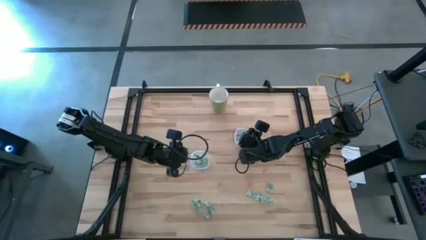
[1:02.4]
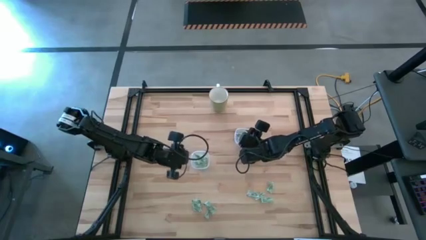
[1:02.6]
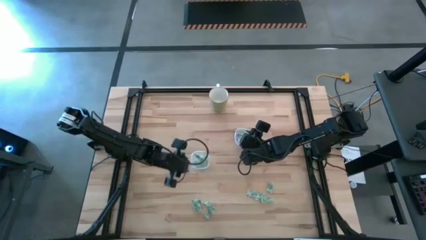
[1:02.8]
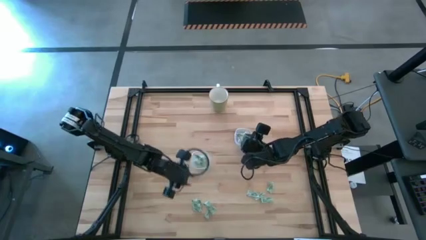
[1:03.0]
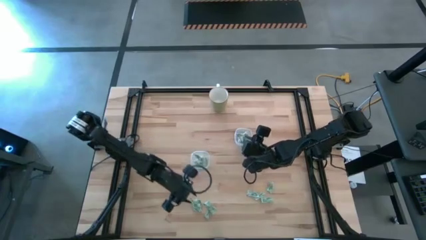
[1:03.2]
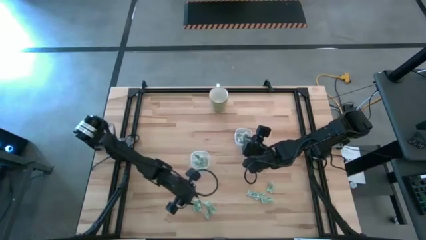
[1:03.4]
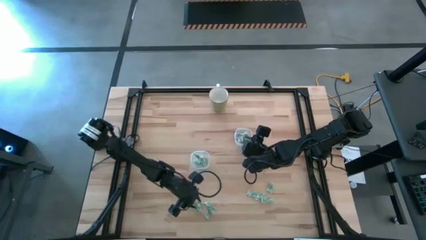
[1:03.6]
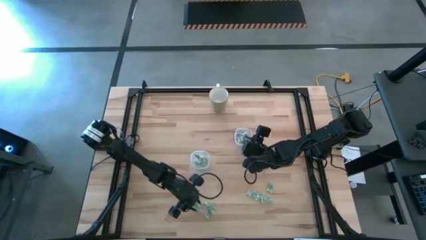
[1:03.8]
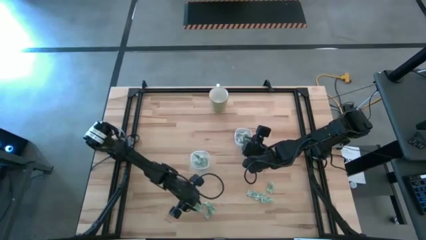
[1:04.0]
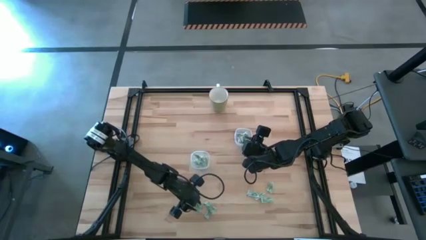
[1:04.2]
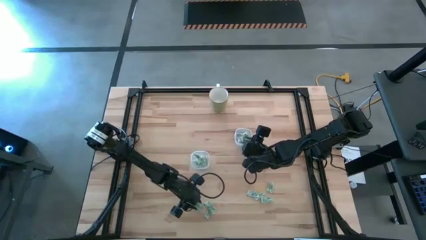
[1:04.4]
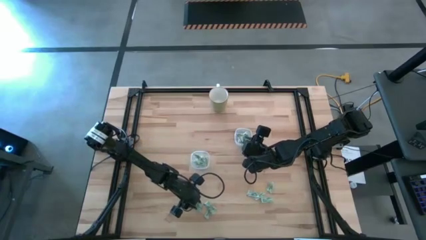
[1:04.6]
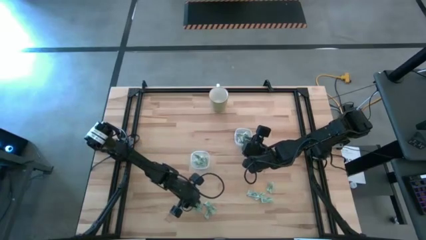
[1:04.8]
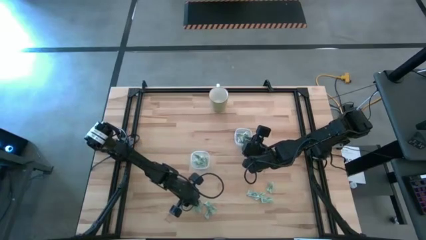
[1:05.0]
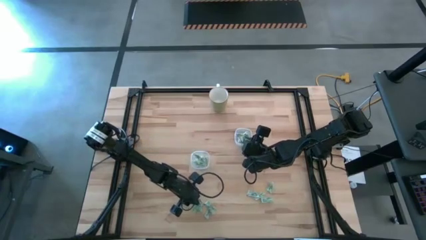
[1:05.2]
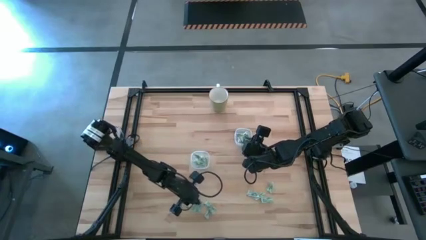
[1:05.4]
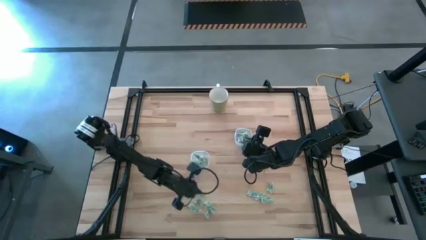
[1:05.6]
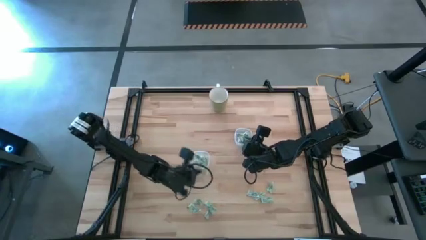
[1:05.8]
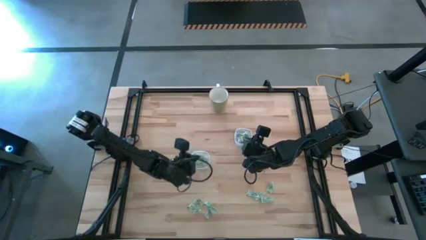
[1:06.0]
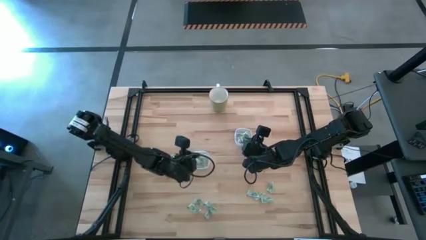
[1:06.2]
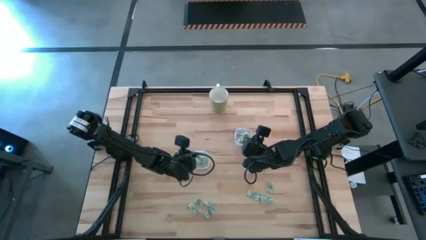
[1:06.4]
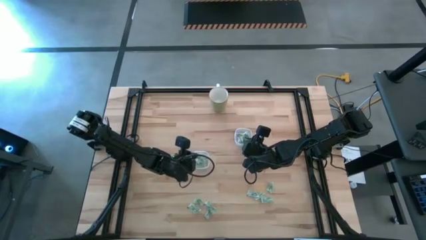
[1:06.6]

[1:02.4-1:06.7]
Task: Pick and place Stevia / Truvia into bins
Put the green stevia packet into the left transparent container

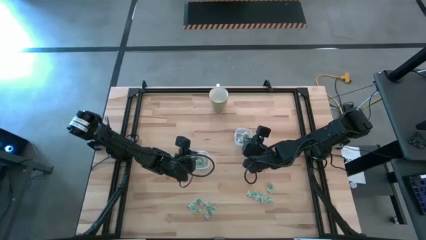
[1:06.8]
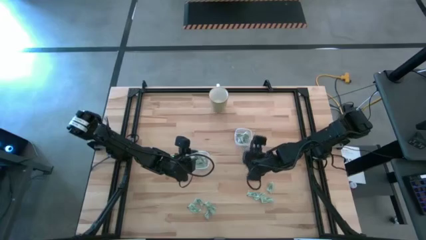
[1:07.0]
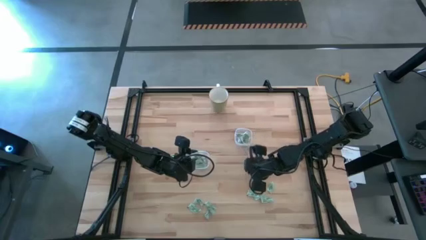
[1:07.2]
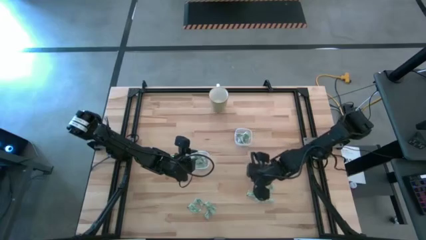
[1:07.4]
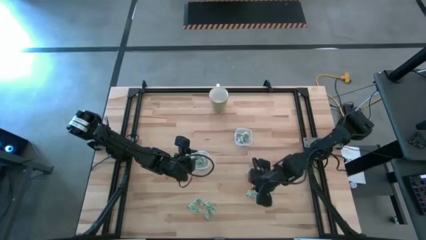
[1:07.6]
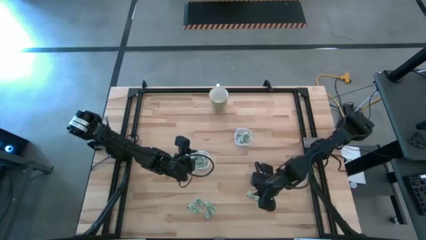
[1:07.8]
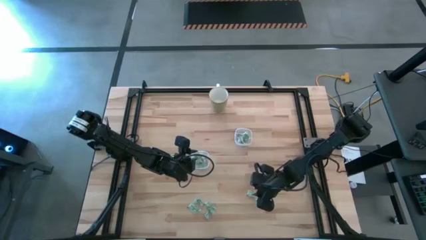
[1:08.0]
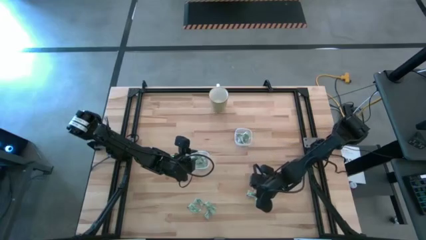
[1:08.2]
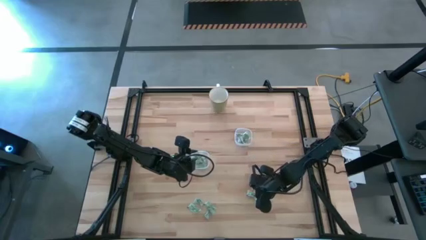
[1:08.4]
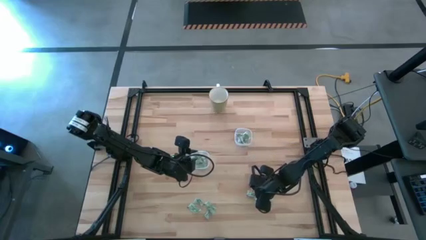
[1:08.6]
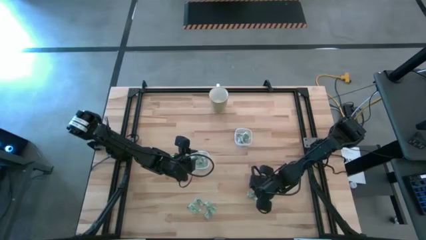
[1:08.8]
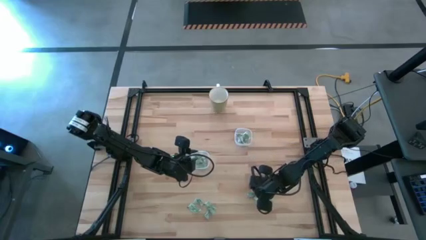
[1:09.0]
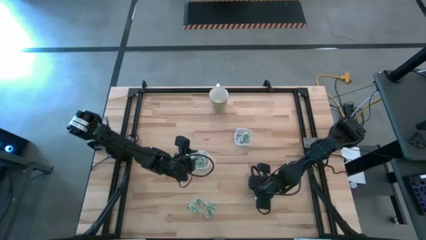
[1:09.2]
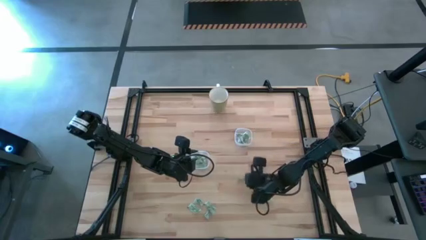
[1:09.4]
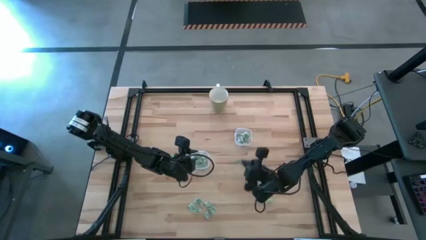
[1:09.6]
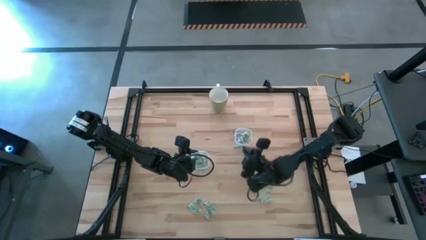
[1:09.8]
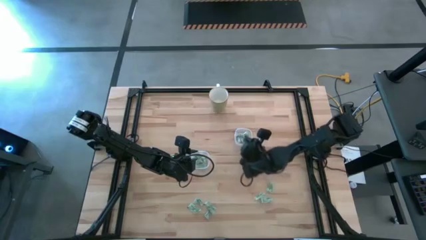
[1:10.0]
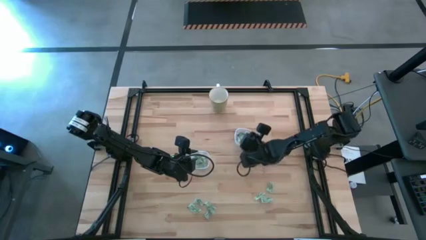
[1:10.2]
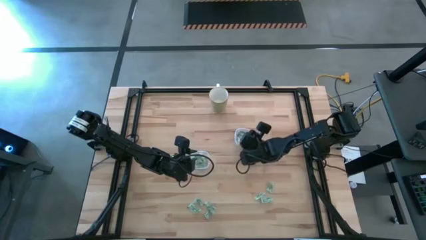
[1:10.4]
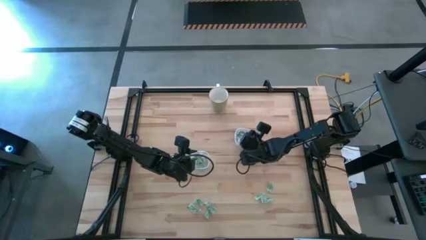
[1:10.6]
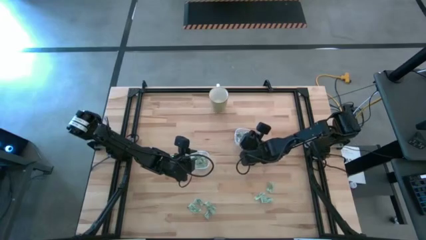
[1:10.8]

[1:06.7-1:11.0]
Put the green stevia packet into the right transparent container

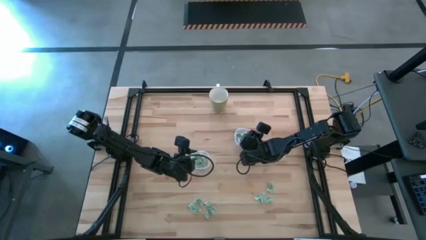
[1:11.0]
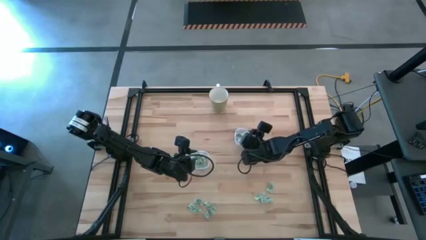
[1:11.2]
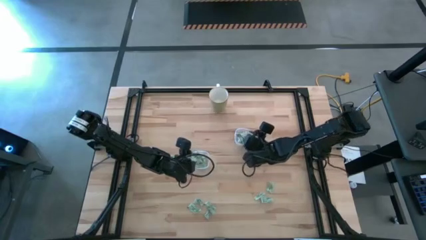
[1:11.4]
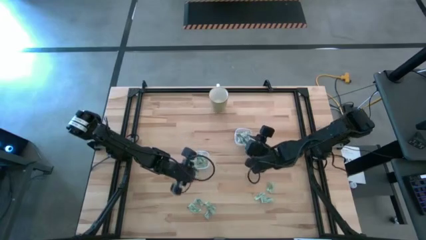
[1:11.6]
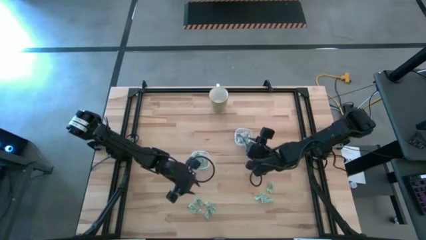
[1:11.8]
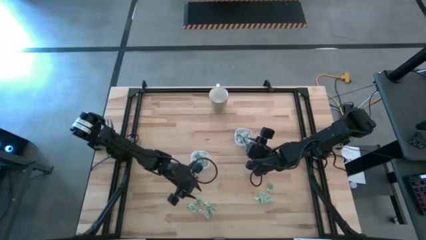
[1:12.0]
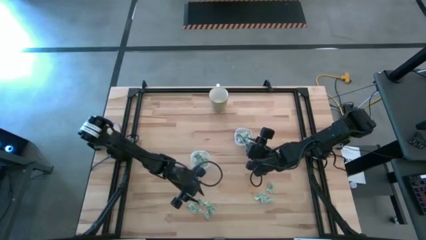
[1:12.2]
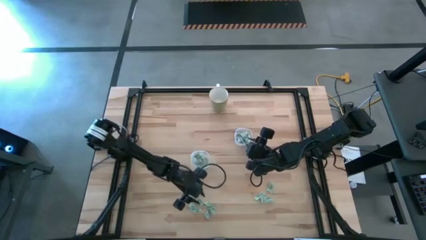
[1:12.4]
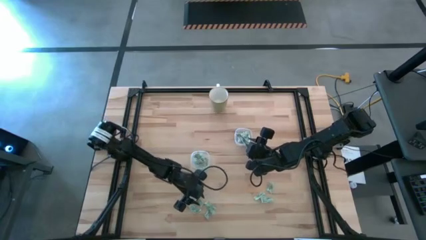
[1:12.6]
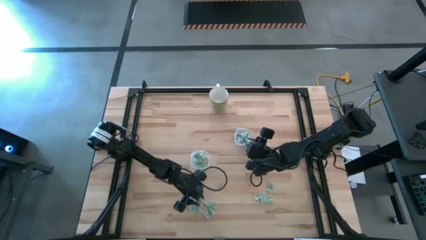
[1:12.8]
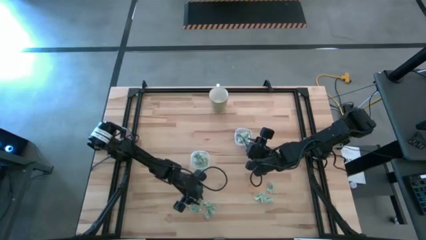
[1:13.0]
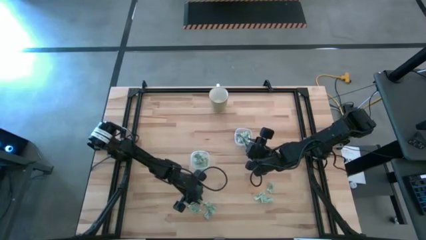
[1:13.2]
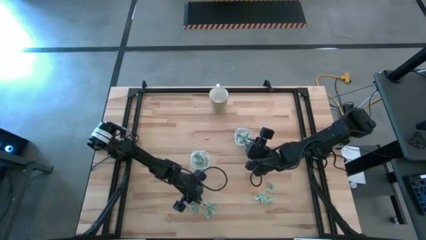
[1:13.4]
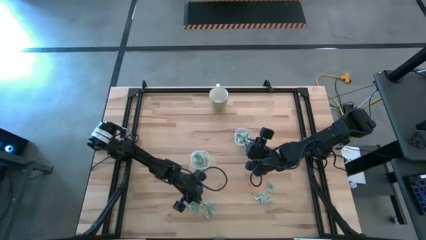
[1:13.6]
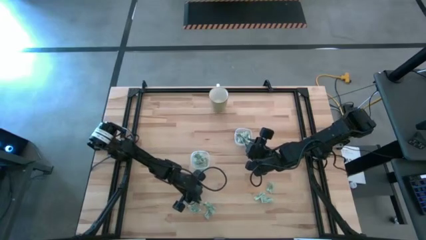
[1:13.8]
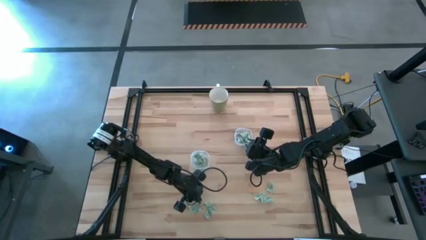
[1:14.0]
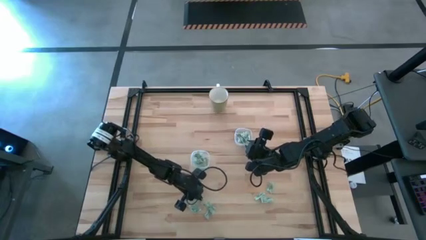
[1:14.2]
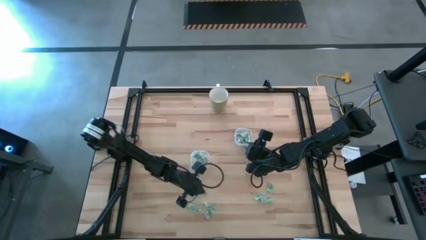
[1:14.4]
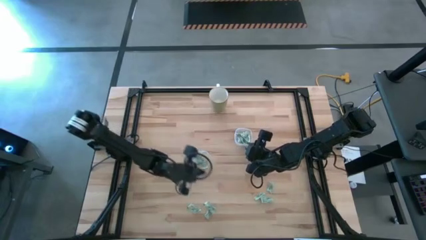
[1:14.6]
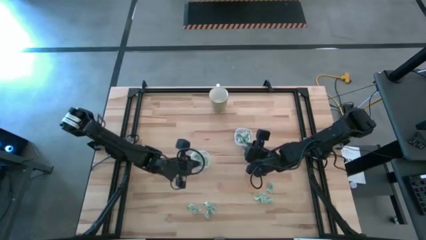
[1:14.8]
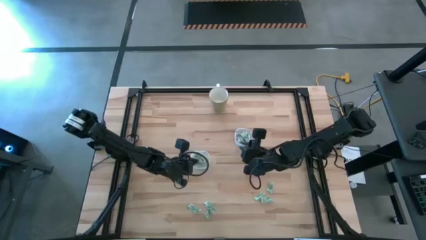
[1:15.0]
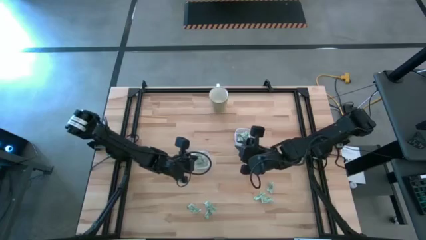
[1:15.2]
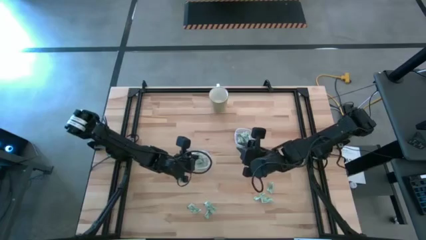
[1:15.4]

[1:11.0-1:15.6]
Put the green stevia packet into the left transparent container

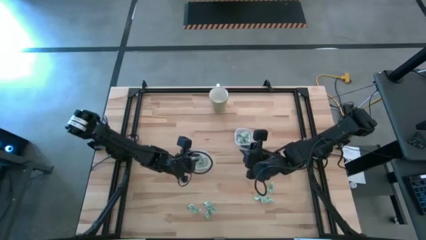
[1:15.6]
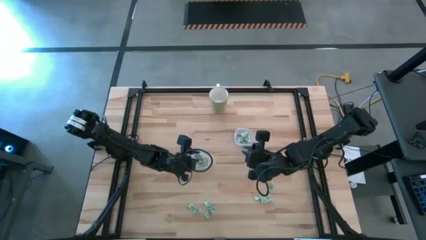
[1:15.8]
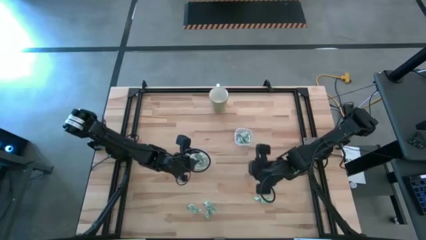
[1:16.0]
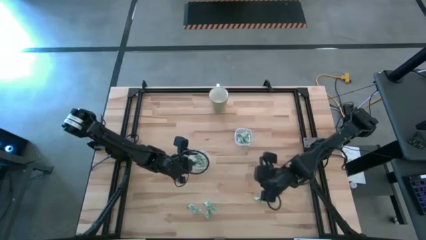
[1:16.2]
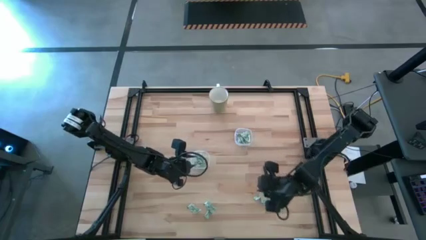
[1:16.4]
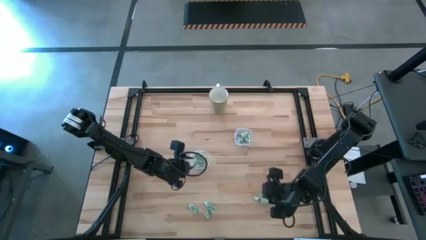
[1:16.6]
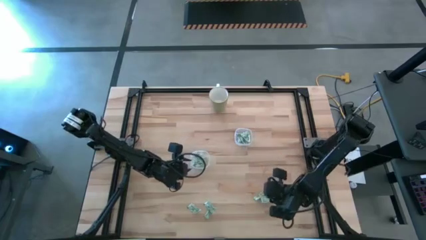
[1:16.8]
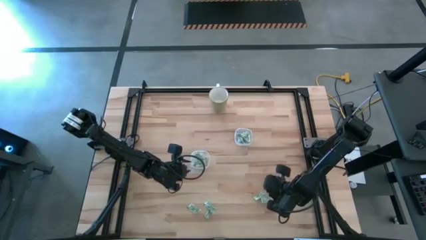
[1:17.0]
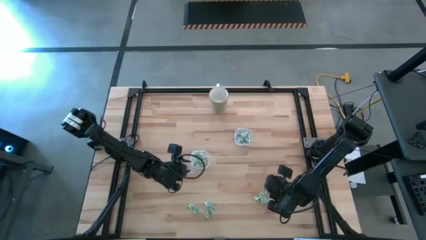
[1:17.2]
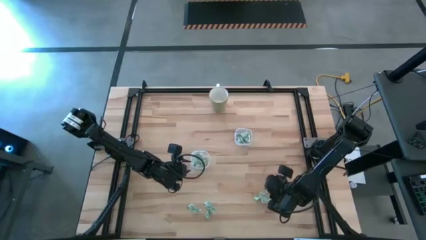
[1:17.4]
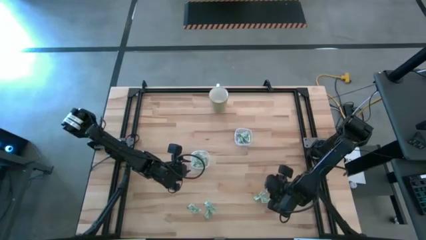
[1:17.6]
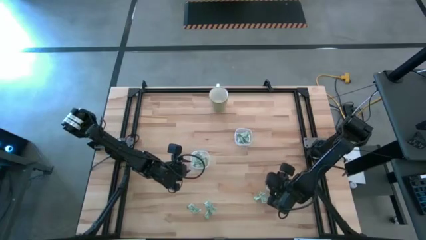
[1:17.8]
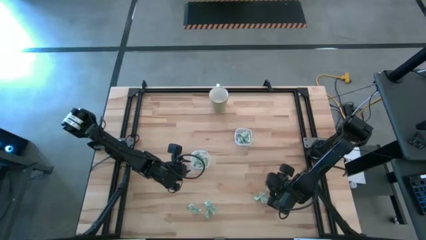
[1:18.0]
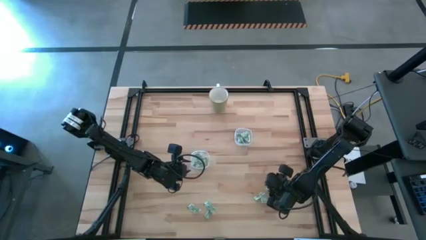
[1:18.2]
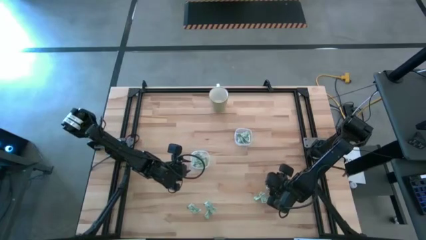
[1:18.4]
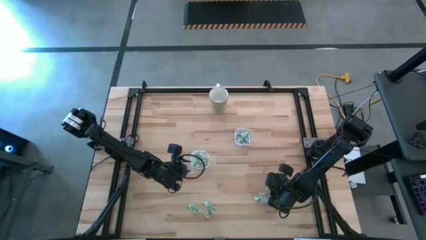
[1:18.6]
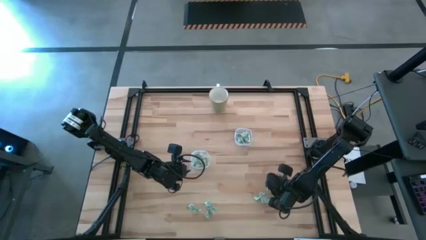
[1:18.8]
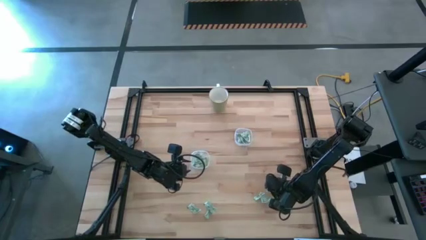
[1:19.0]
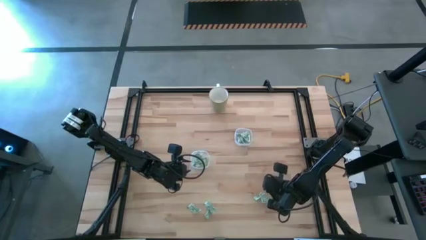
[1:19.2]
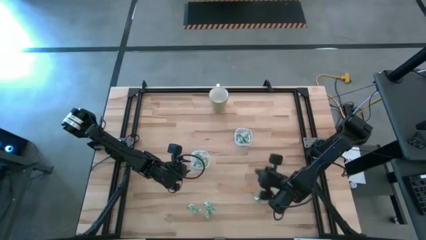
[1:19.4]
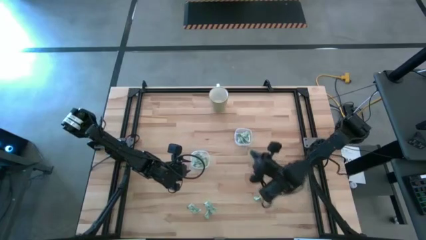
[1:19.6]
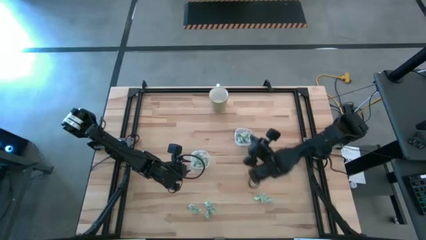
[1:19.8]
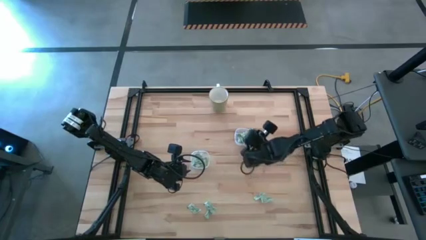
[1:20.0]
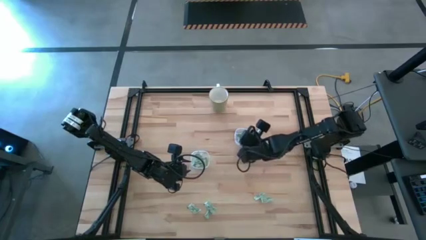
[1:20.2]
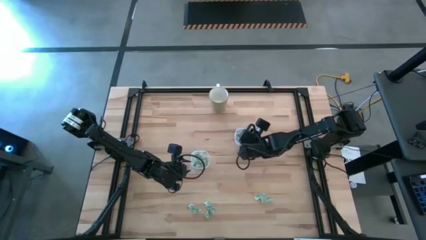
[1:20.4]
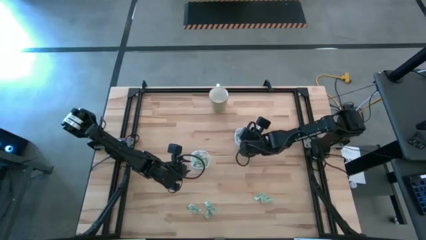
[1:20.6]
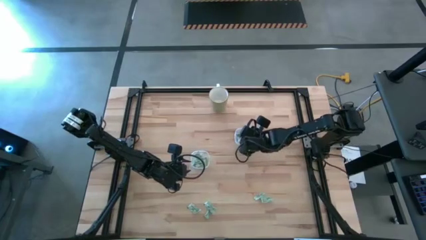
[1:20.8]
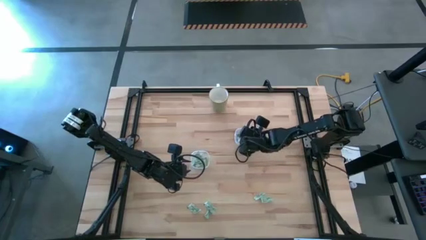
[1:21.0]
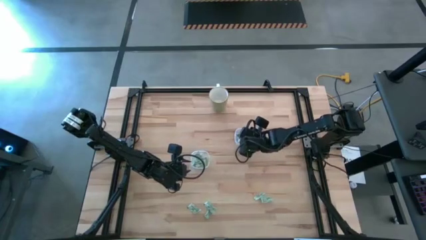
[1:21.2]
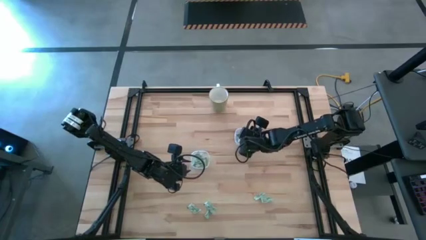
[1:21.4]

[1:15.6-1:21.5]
Put the green stevia packet into the right transparent container
